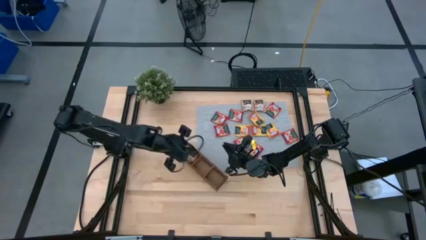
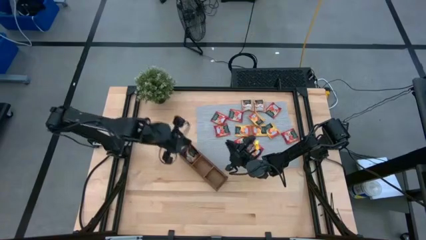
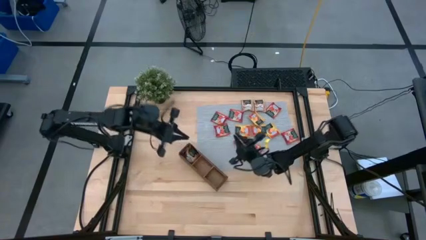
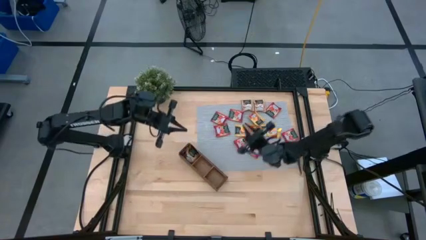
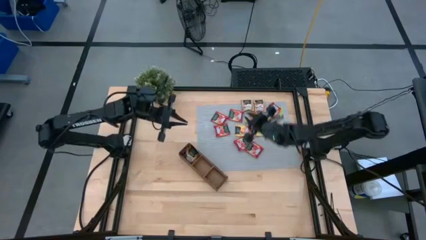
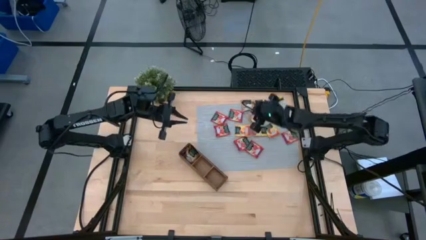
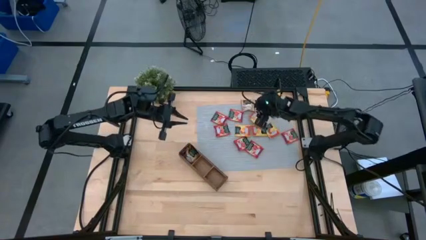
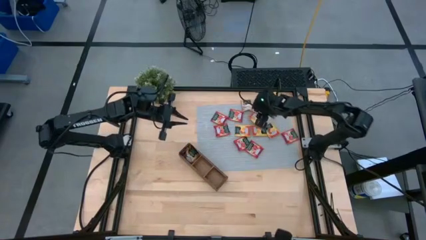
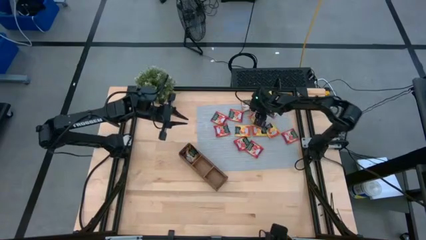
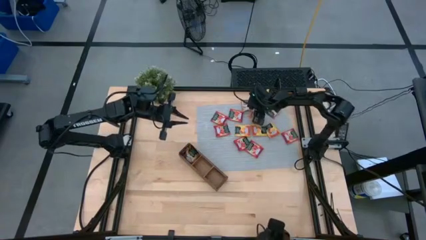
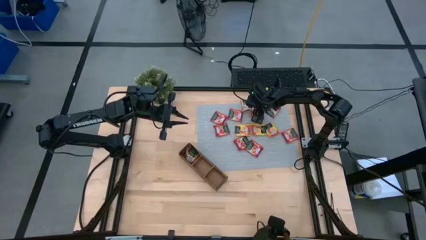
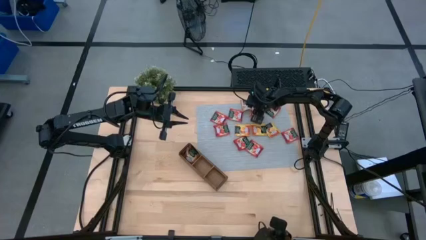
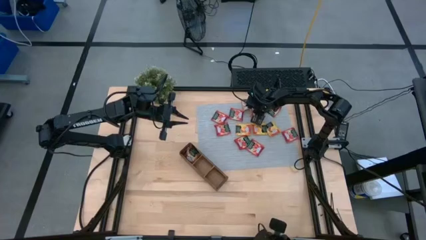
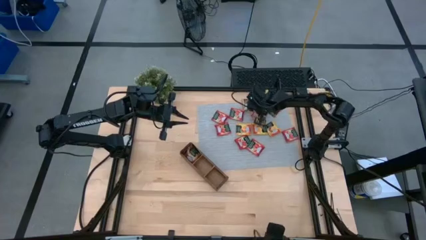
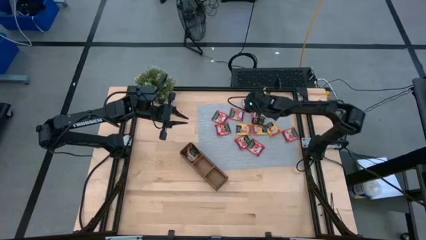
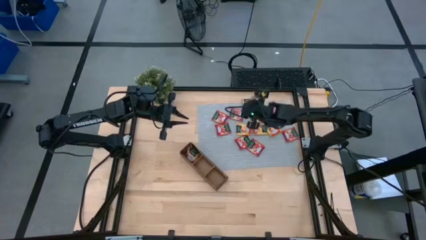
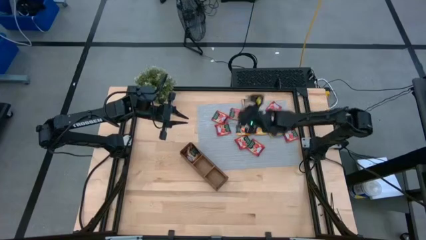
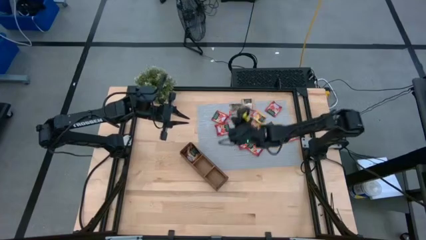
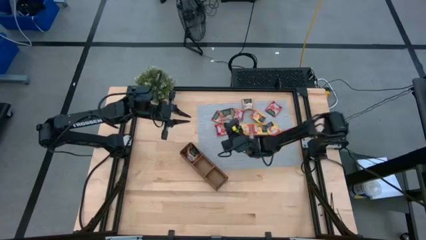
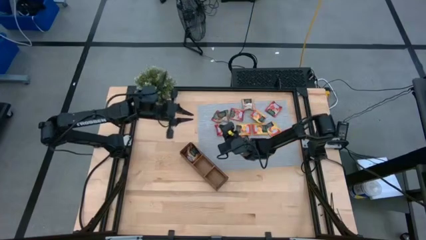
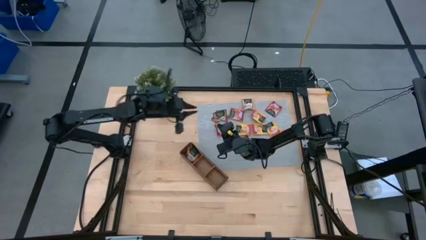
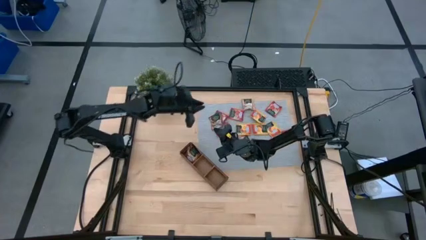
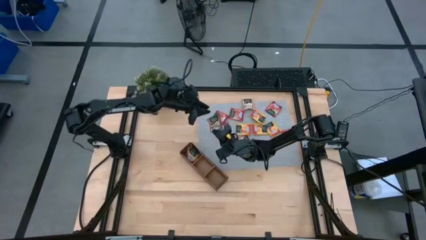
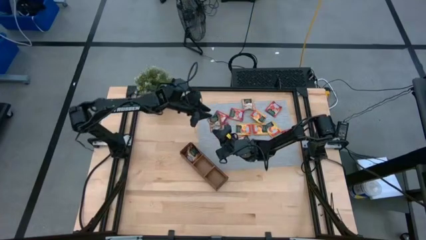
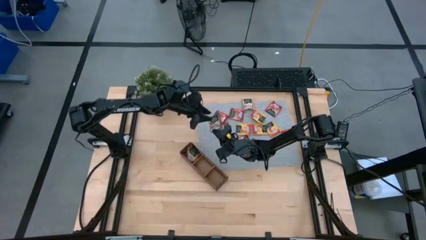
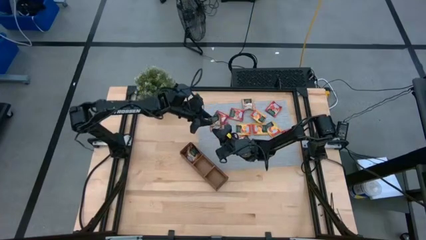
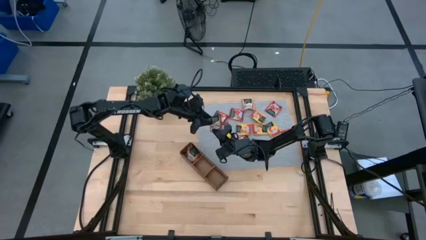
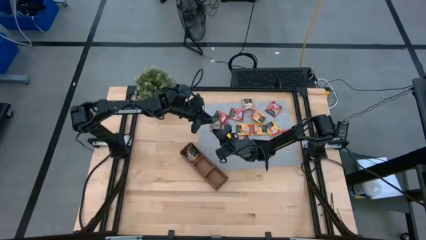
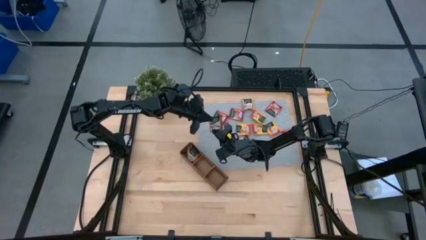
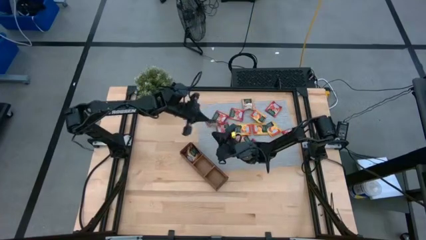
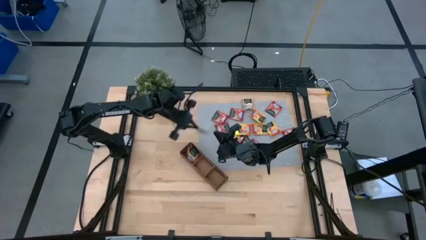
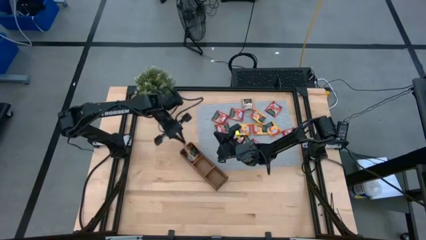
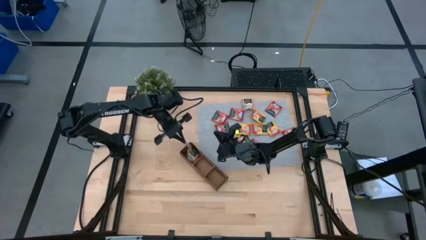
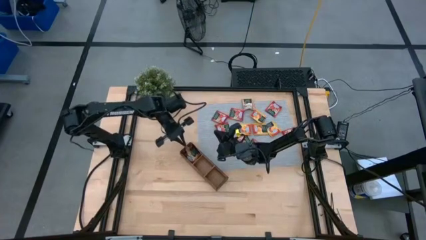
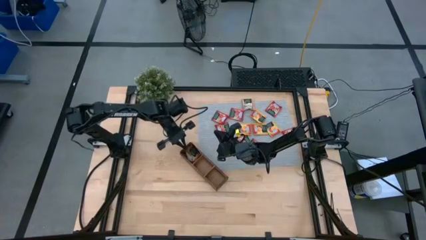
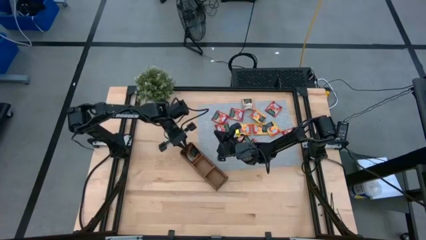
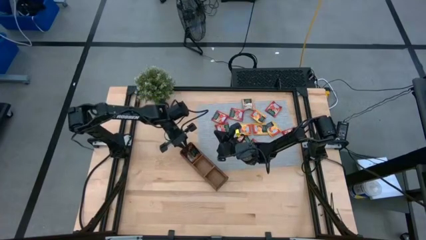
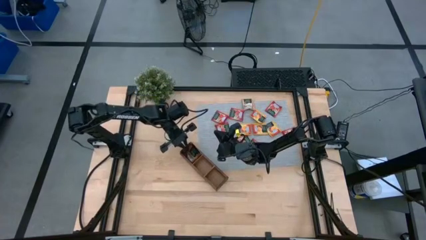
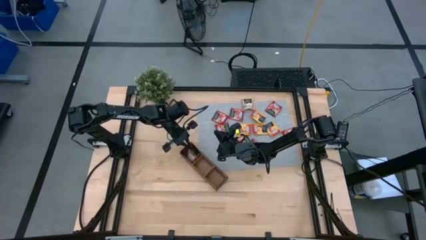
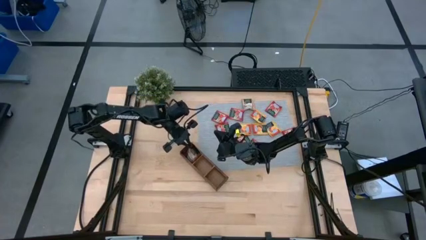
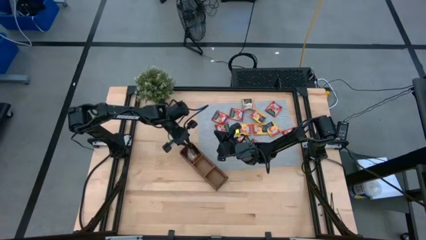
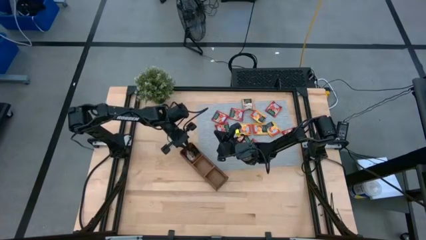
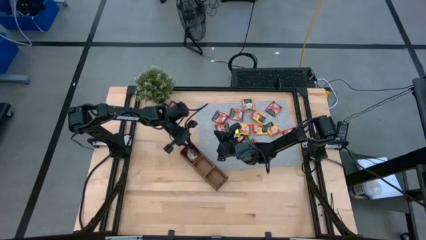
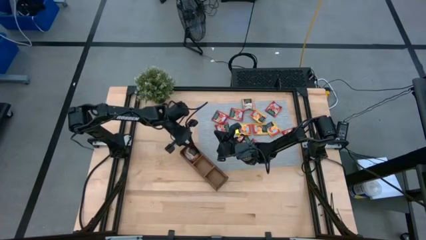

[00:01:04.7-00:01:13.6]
Task: Pick & Place Tea
Put the brown tea bag into the left section of the wooden organizer

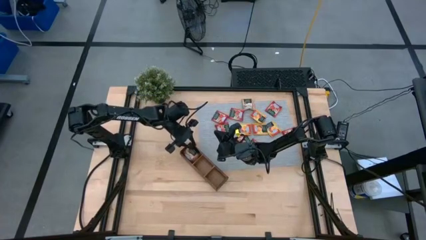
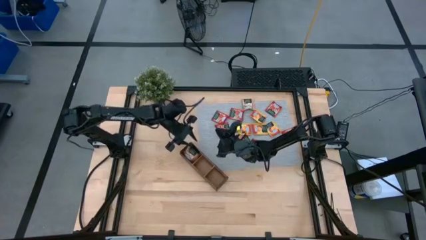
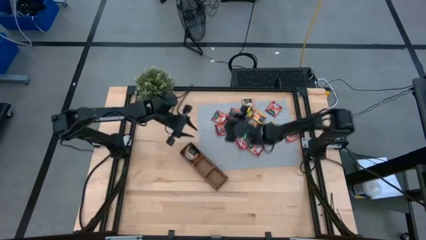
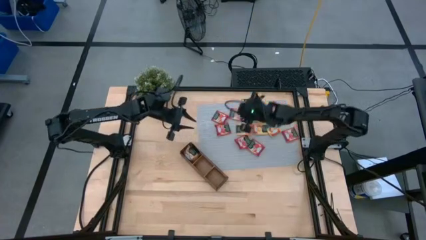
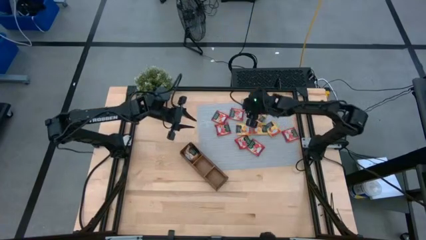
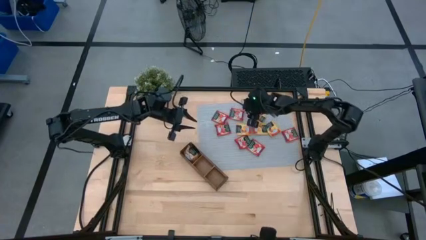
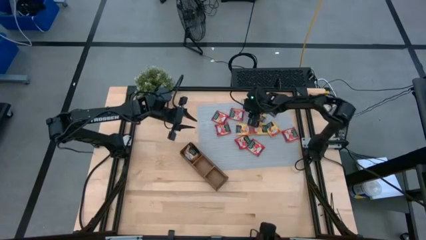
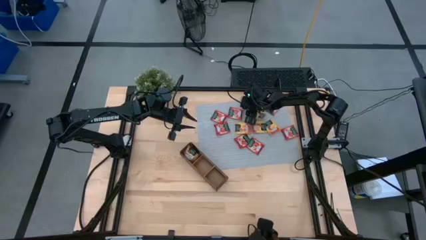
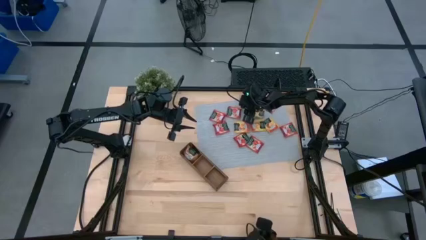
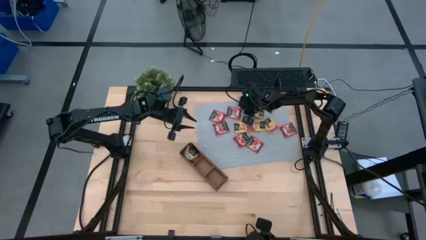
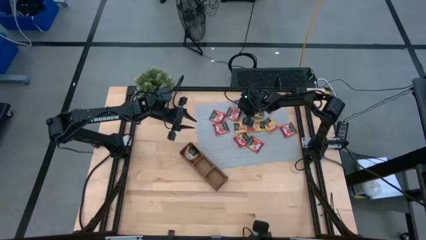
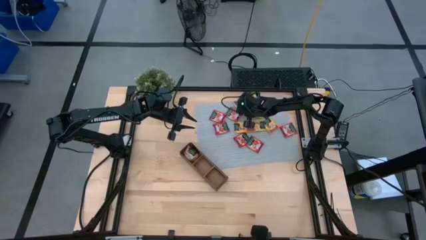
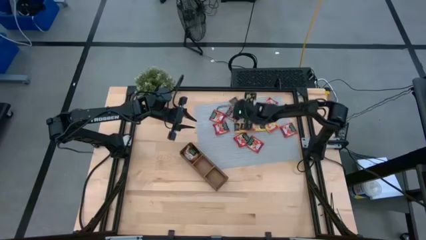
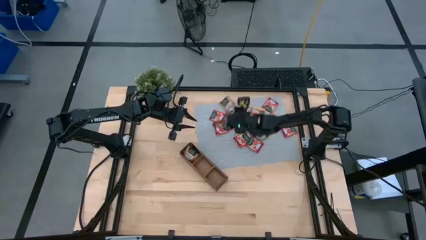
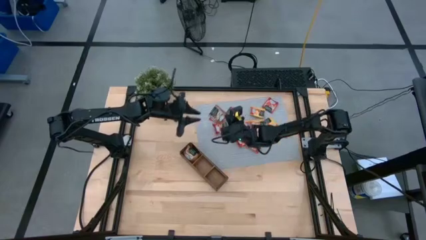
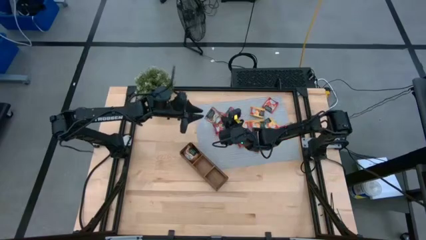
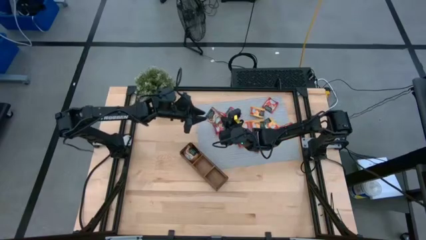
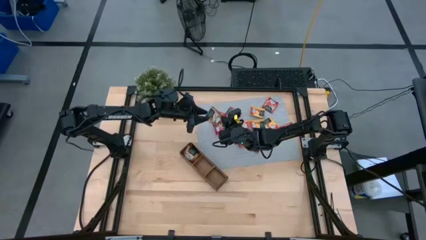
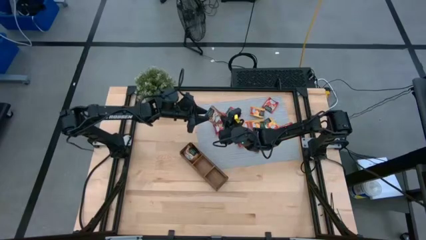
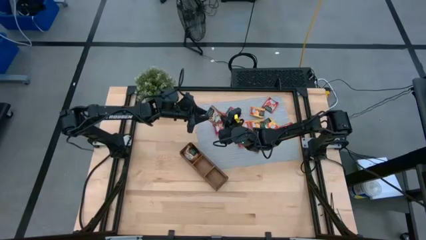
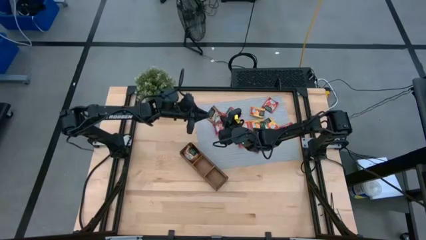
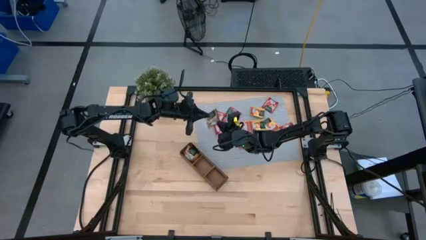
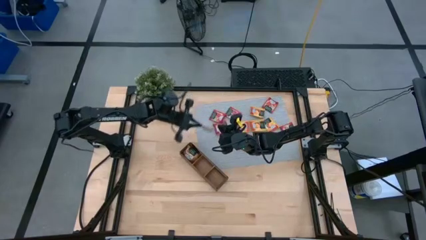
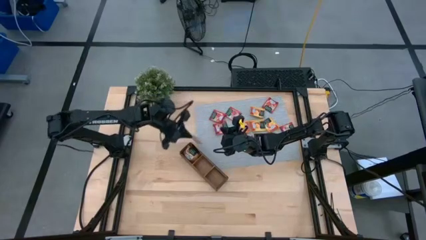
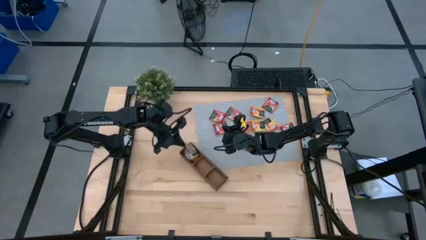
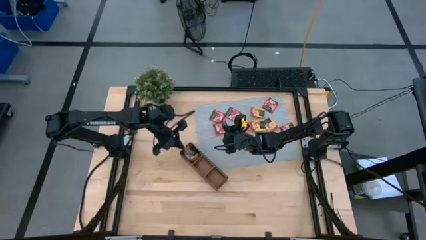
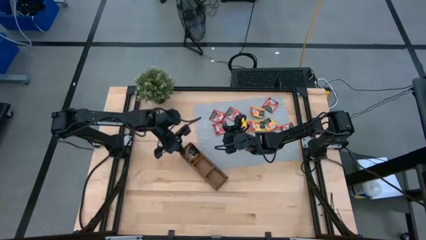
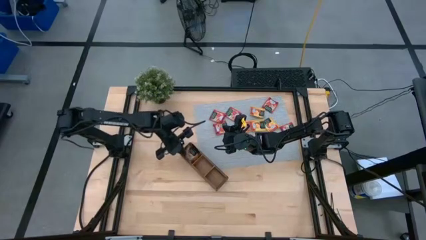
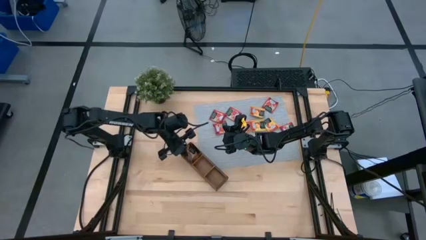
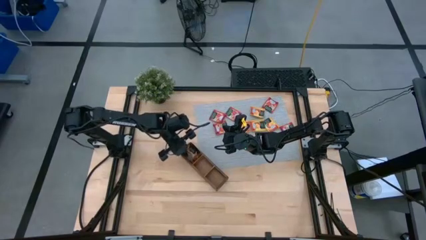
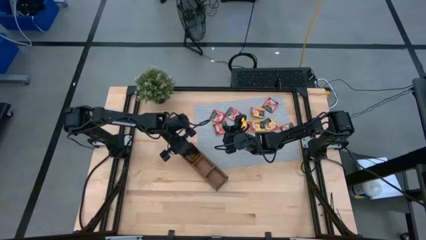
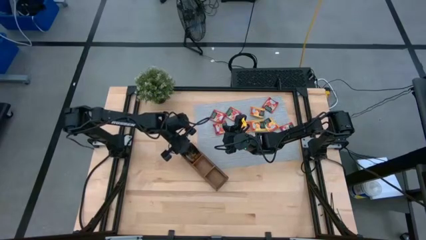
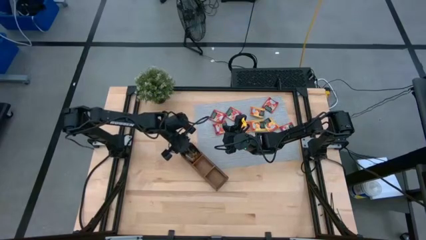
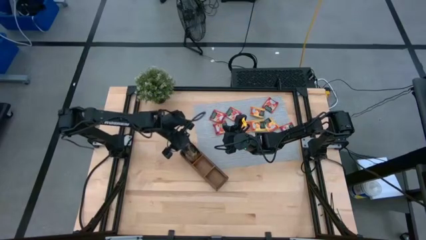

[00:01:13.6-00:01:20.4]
Put the brown tea bag into the left section of the wooden organizer
